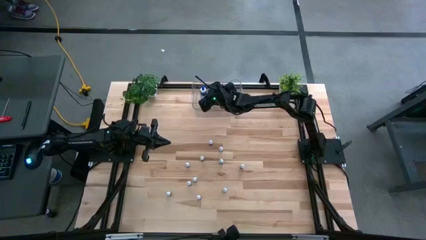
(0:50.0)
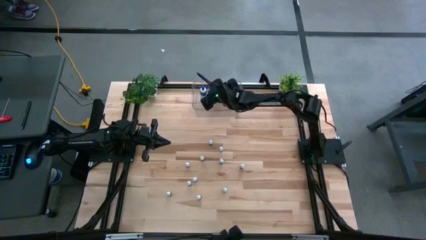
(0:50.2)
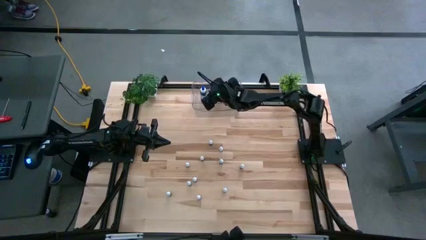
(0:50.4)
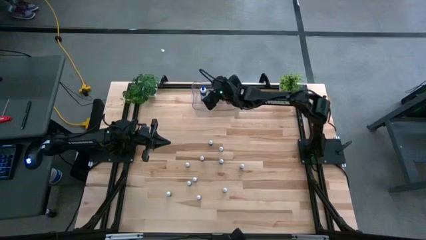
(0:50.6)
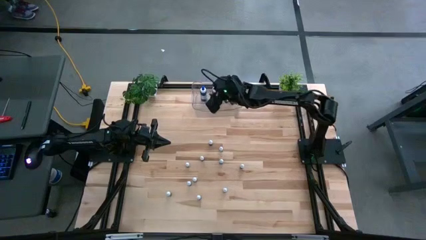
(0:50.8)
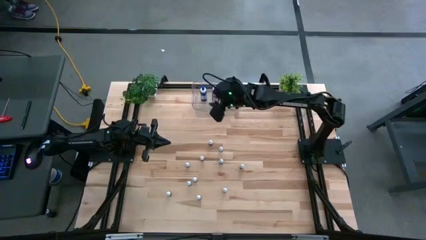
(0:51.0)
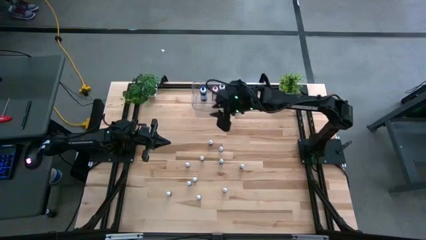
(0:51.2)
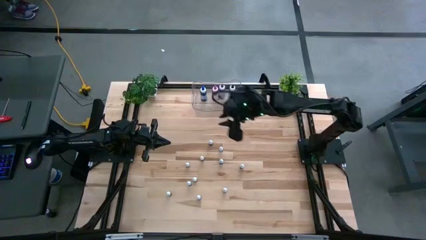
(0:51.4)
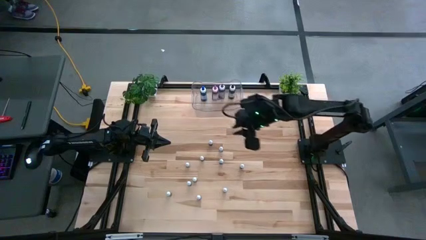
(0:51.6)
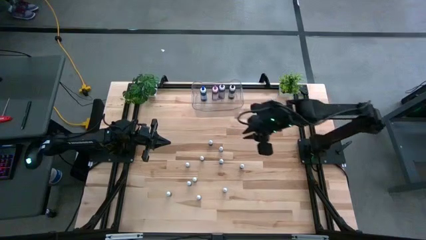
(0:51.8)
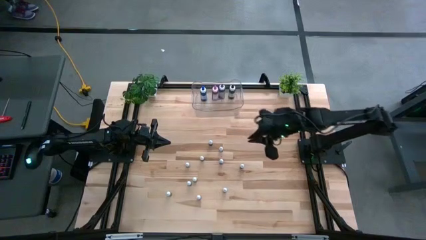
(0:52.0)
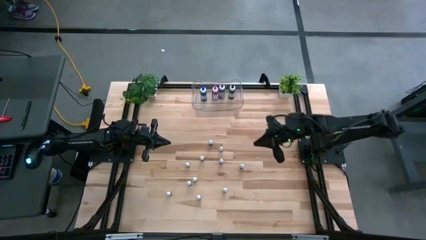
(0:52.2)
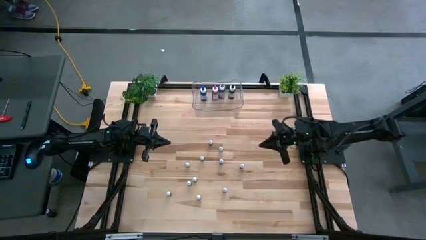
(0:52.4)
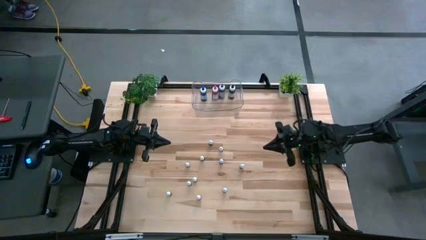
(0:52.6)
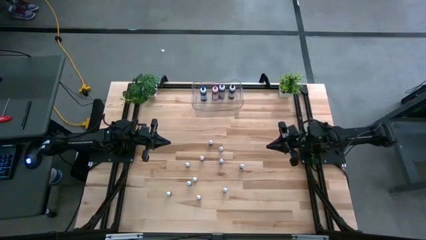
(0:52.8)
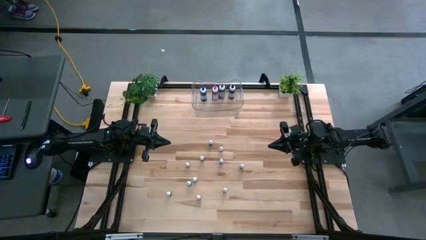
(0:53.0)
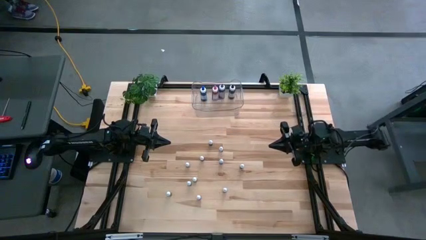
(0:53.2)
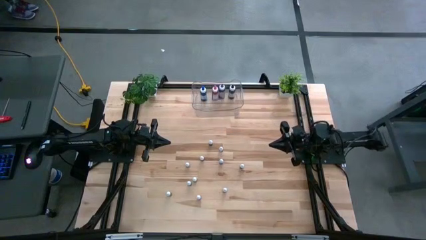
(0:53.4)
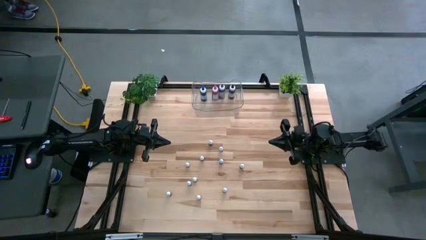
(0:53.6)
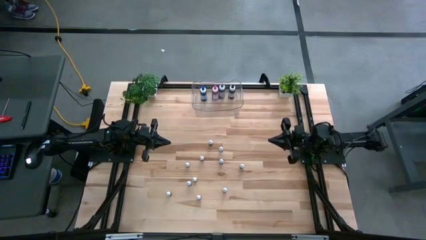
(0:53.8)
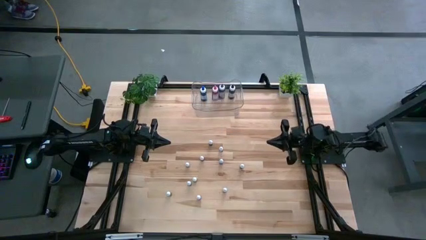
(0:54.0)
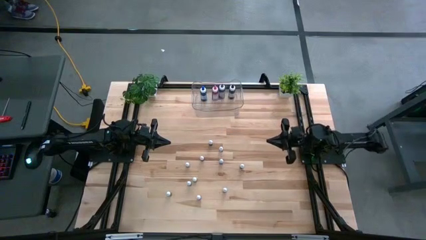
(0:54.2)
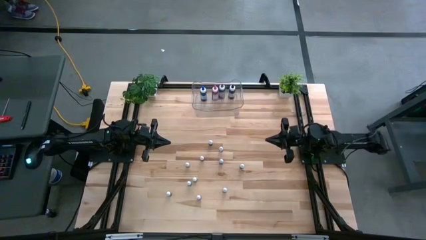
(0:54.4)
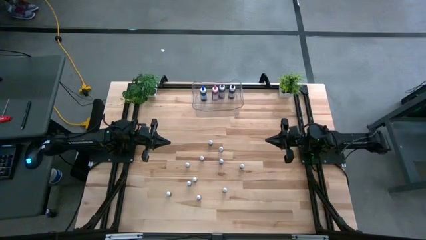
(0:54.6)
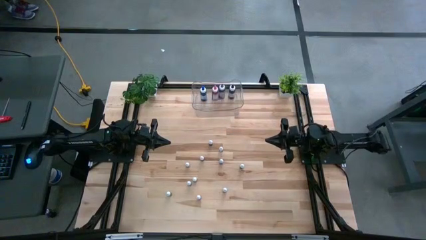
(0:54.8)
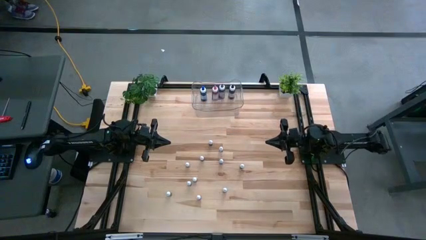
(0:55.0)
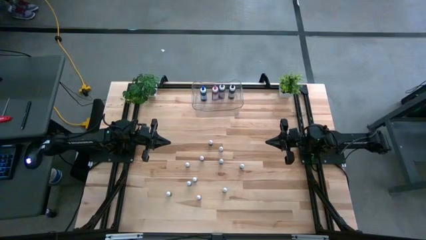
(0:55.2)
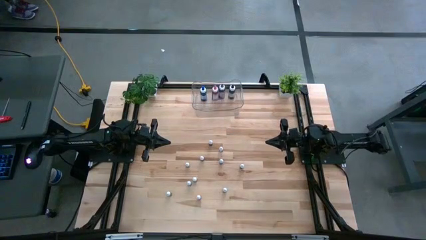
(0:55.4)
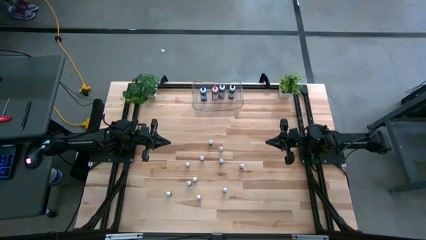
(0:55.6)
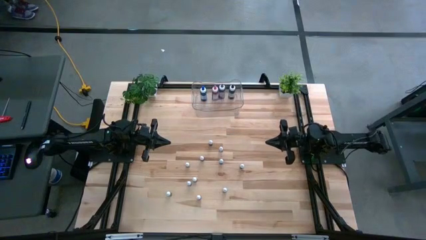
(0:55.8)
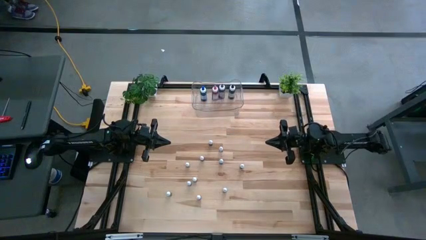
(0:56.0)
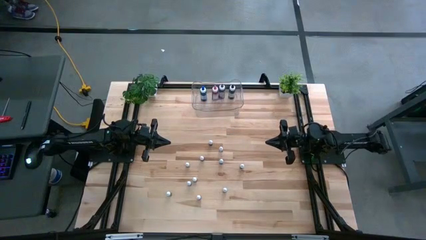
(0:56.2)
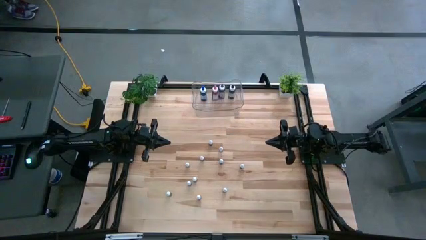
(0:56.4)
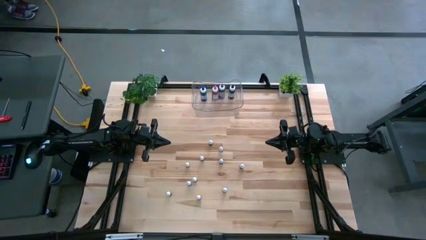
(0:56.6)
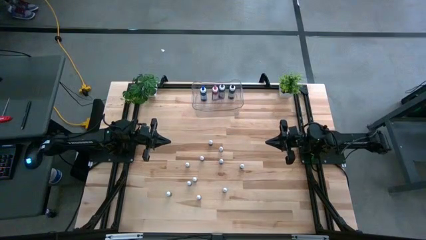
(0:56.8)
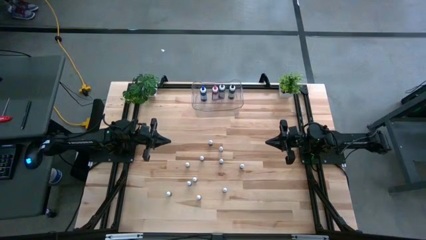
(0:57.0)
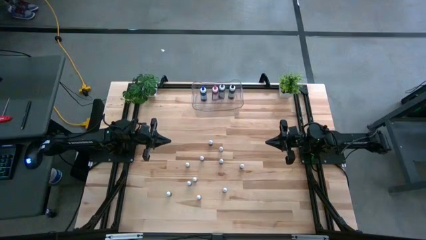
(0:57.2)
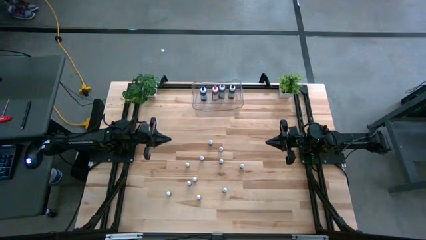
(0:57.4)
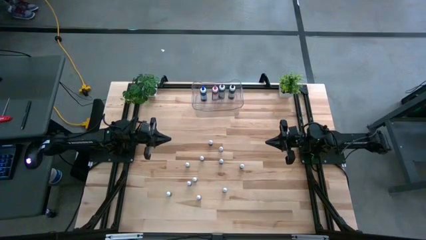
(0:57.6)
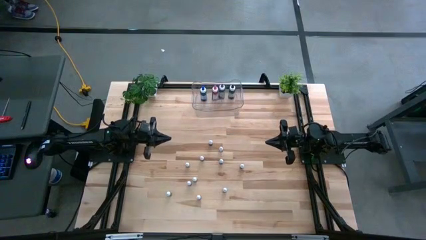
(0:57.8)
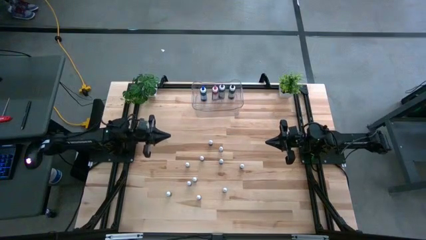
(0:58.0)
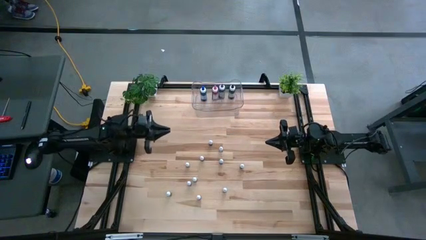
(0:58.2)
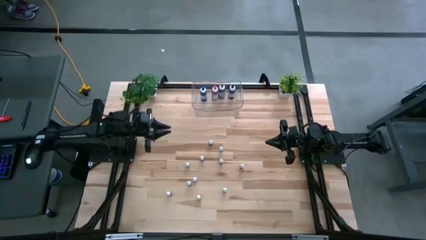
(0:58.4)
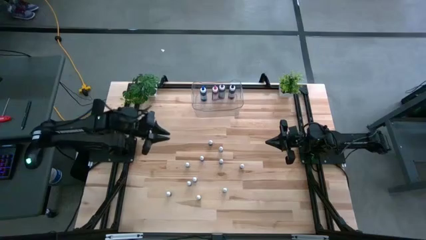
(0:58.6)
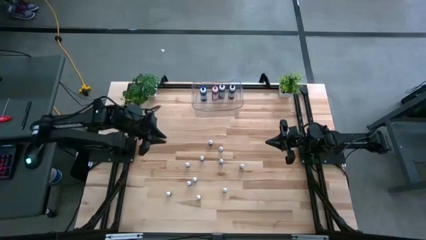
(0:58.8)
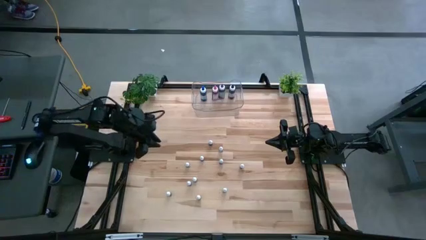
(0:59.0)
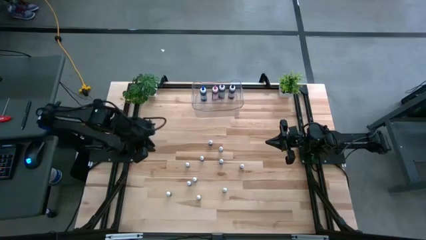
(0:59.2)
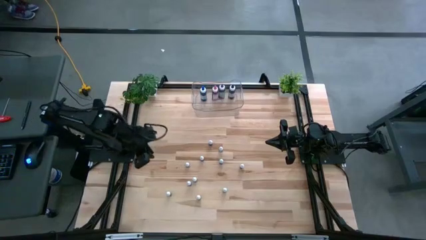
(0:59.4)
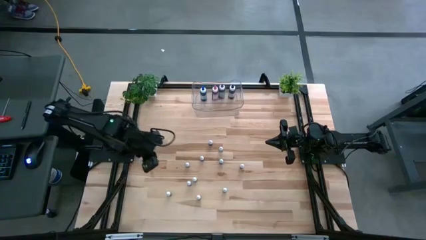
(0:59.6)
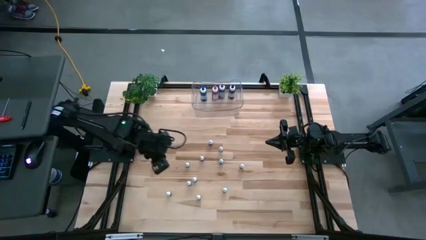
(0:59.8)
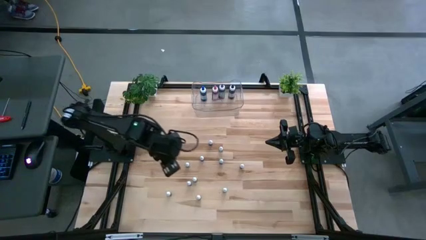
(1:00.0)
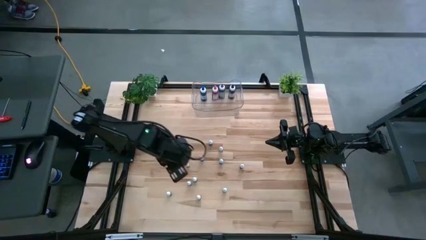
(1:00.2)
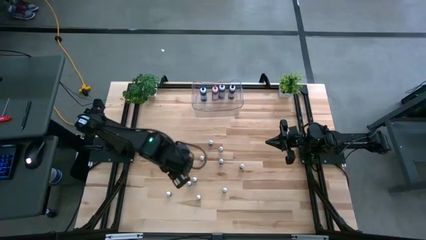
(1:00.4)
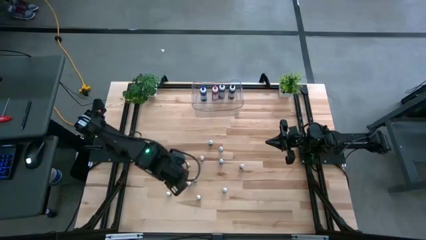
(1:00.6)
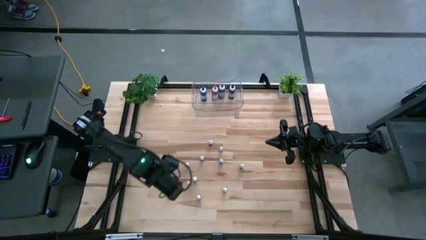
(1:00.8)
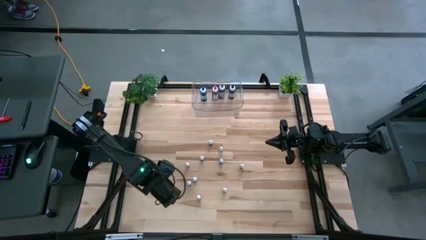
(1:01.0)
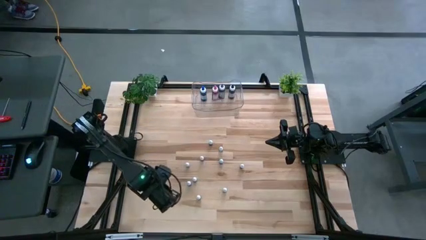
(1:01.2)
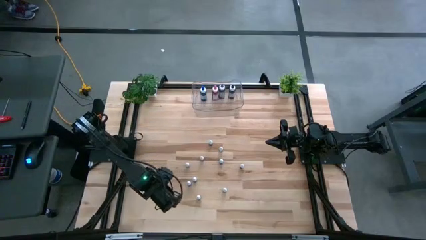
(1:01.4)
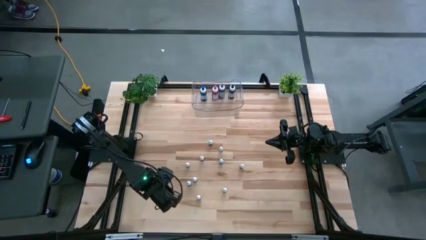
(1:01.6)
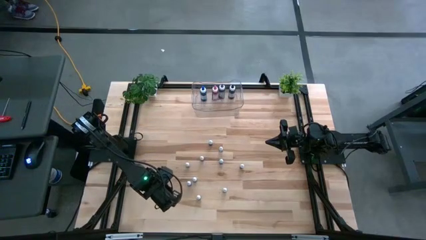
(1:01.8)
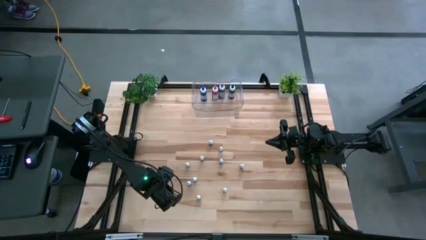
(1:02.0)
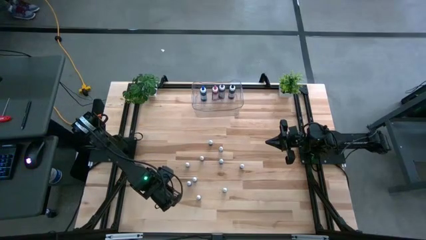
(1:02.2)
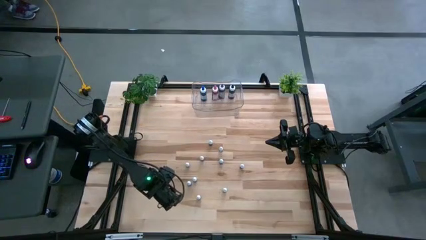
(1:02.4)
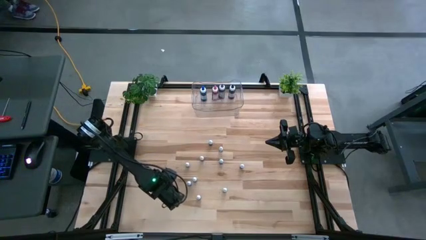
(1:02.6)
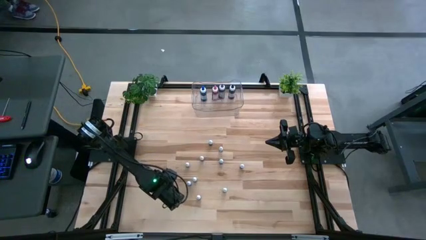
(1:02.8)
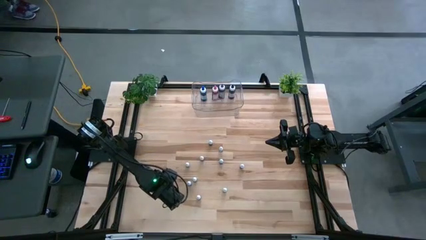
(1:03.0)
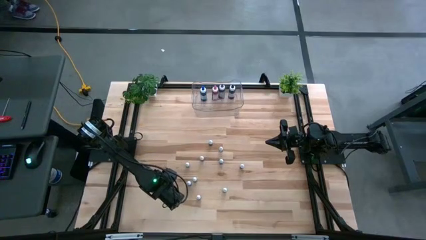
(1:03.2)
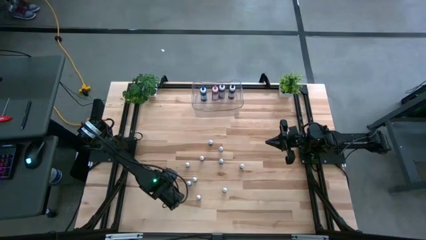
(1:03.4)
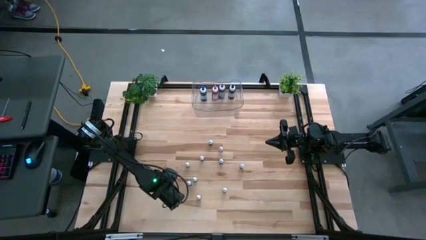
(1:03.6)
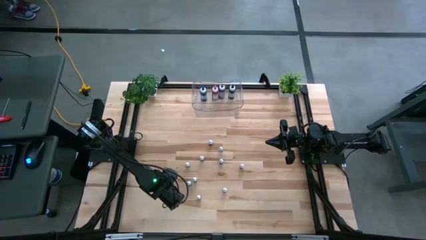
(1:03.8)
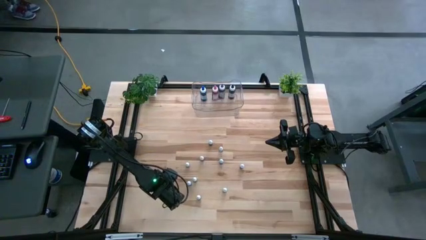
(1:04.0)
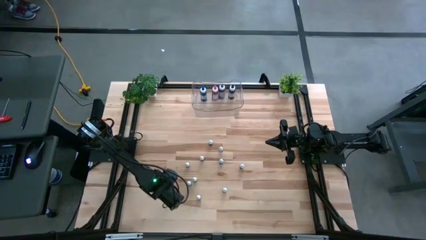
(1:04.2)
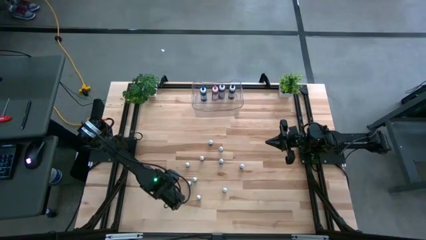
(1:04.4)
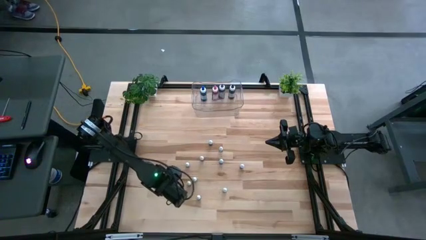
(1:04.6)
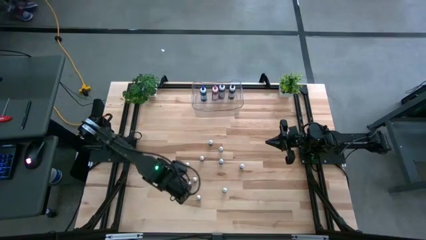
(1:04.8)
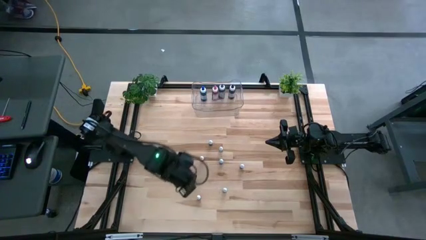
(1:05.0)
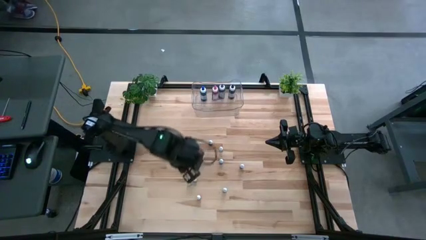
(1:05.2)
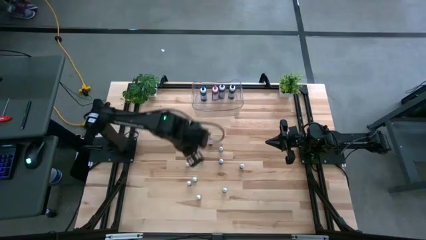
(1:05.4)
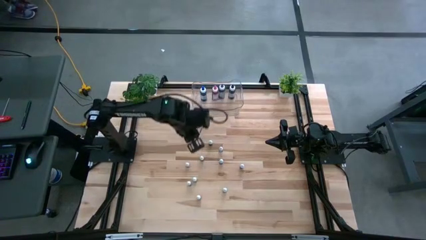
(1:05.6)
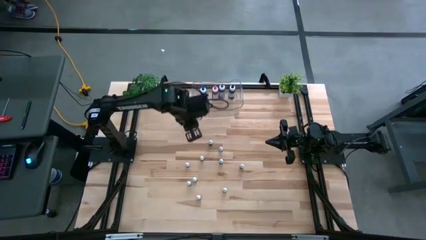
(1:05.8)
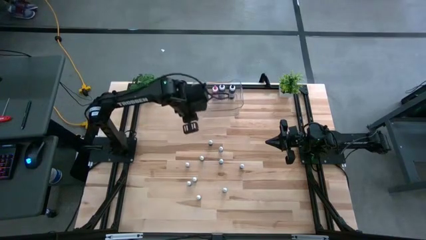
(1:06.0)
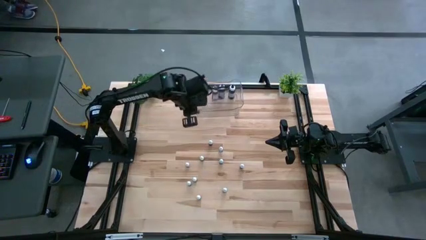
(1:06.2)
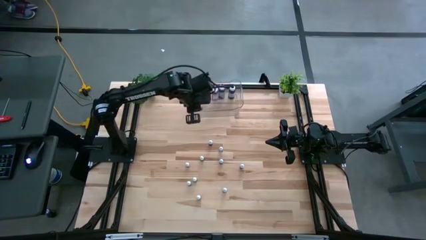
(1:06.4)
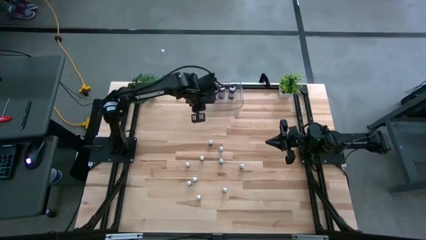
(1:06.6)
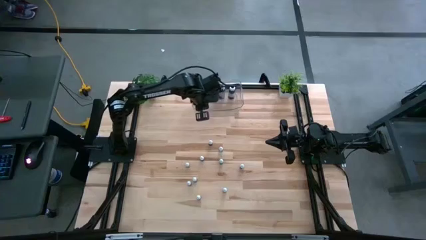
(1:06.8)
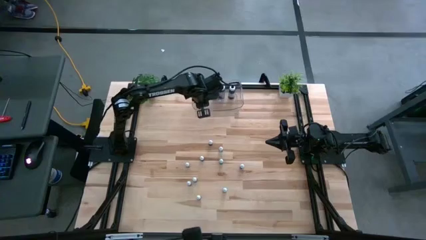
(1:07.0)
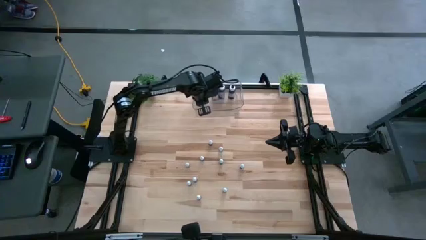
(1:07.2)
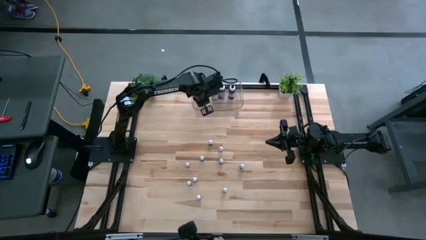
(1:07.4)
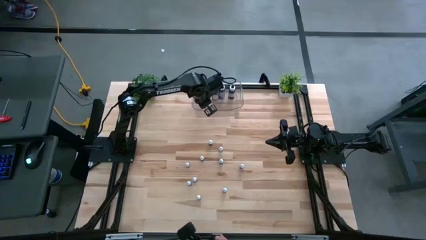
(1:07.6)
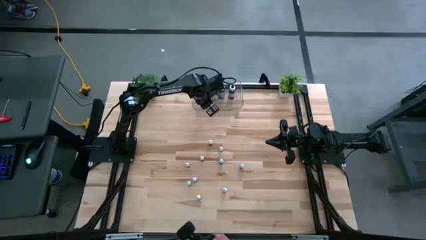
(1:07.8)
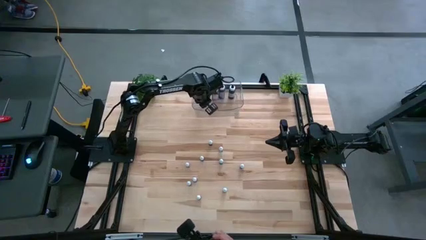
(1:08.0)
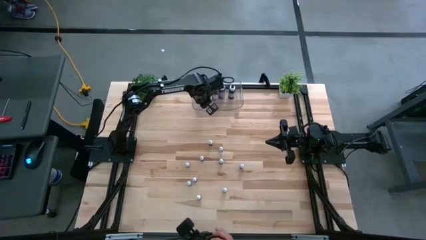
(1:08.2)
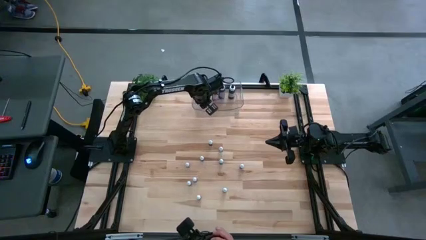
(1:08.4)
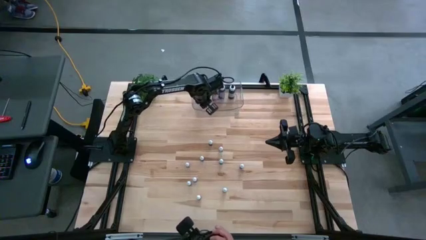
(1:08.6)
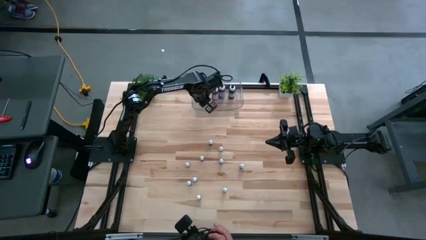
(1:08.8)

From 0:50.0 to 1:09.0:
Task: Pick & Place food coloring
Put the left small black food coloring bottle into the transparent bin
